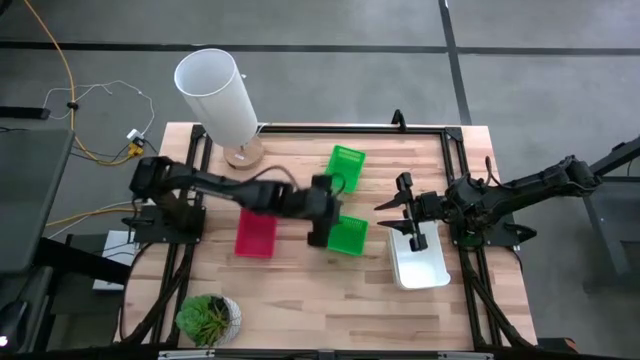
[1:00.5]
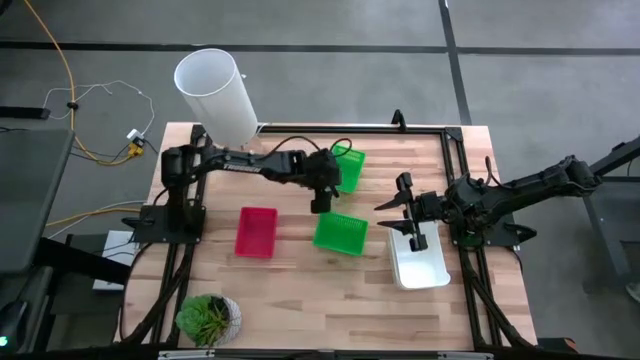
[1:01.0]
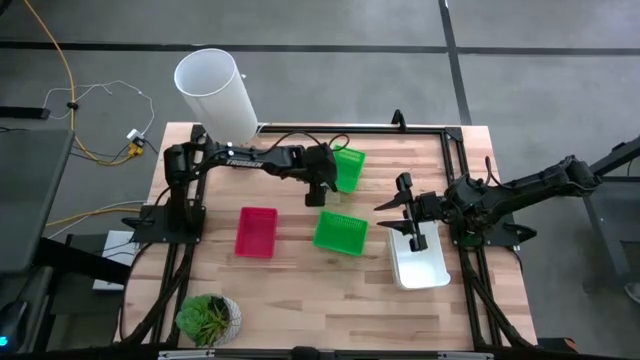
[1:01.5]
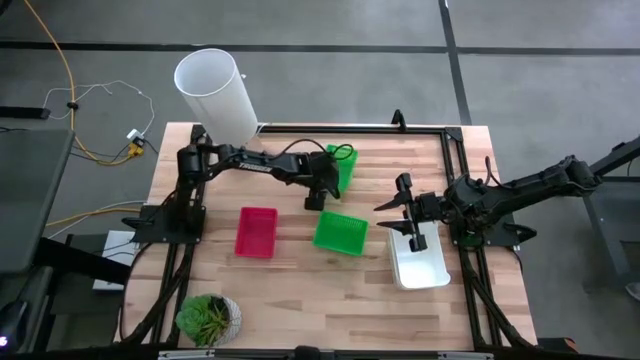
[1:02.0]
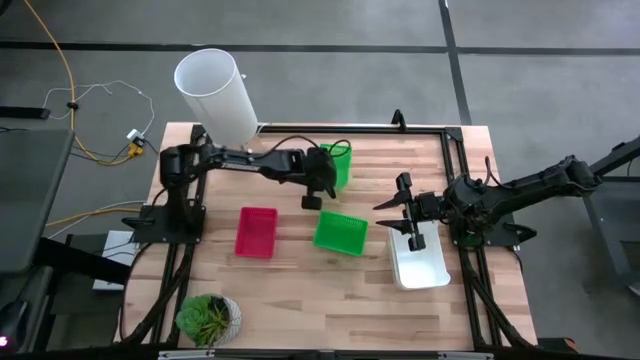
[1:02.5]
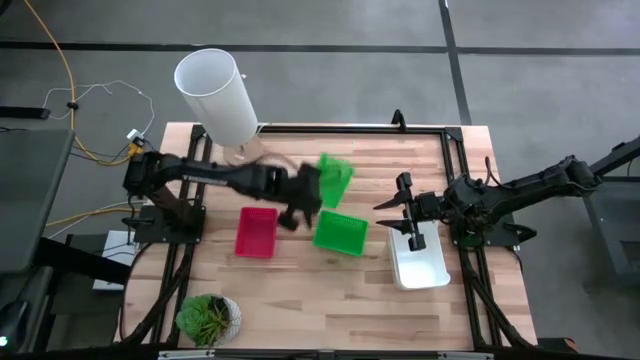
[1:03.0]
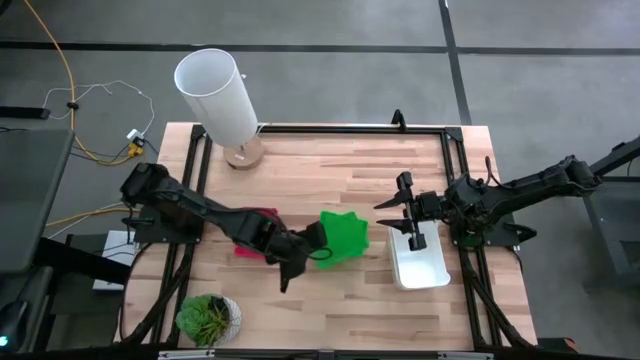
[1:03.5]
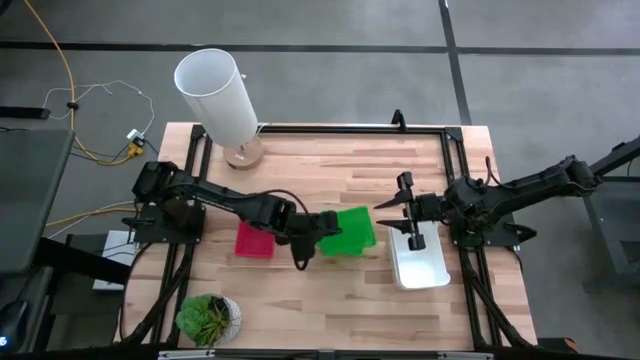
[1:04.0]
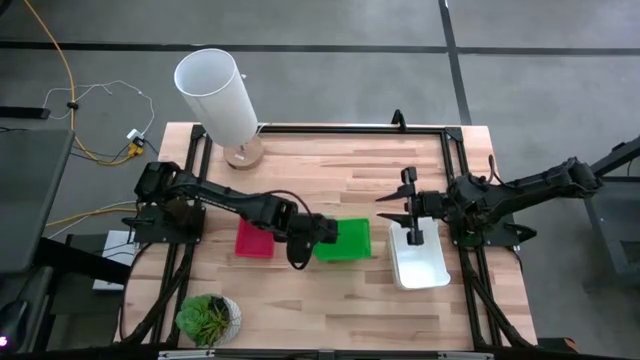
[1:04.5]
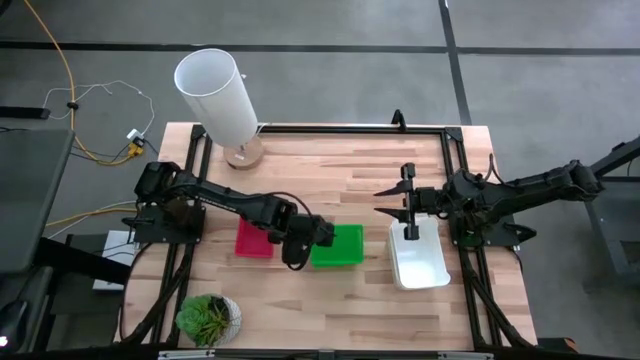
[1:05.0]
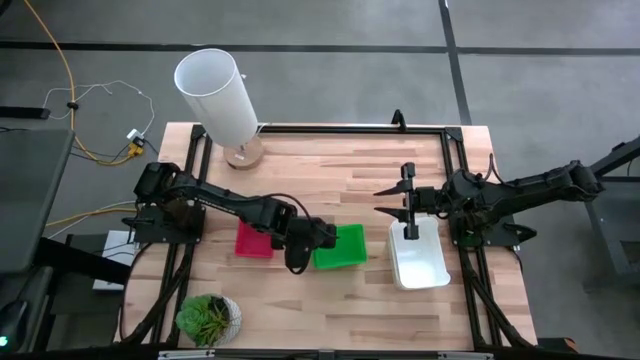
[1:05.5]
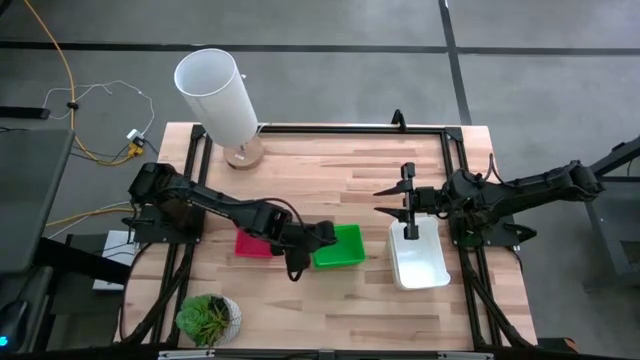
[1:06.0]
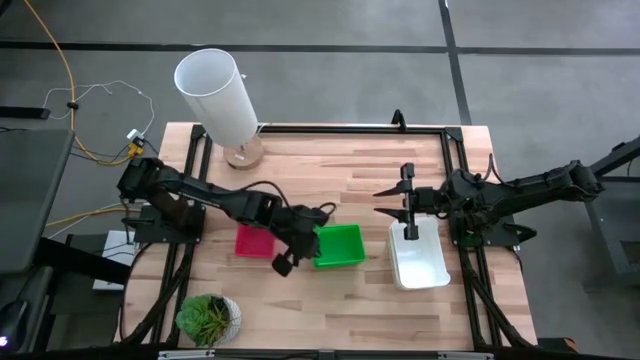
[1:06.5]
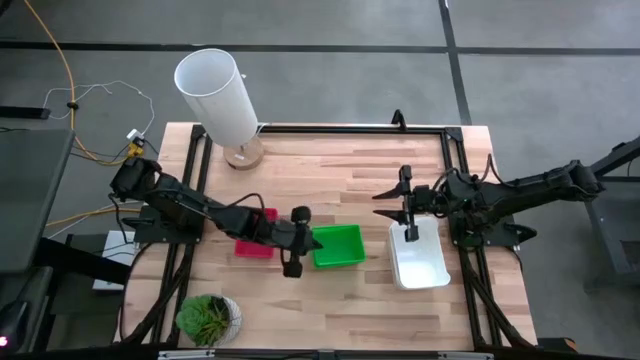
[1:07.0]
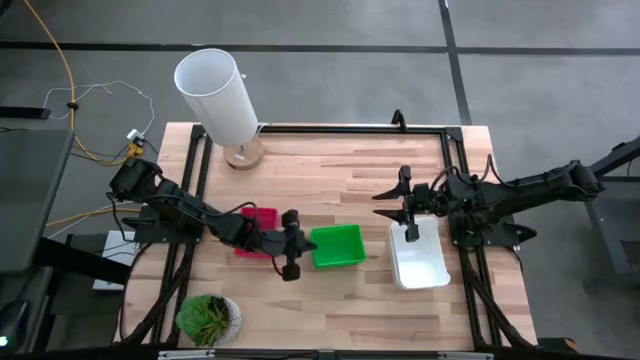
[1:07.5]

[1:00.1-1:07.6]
Stack the top green bin on top of the bottom green bin

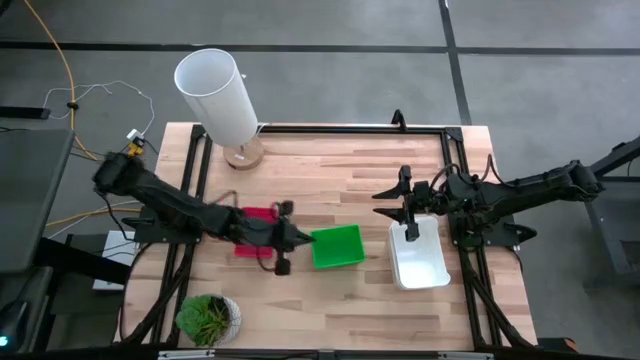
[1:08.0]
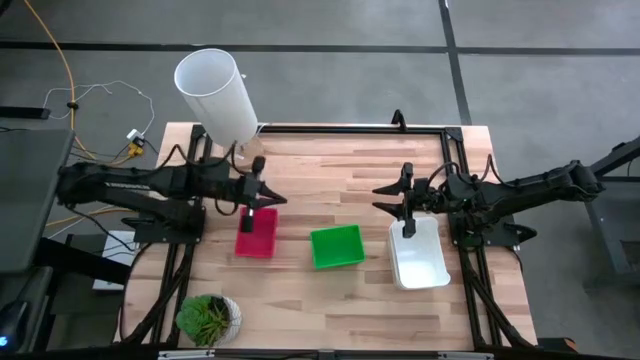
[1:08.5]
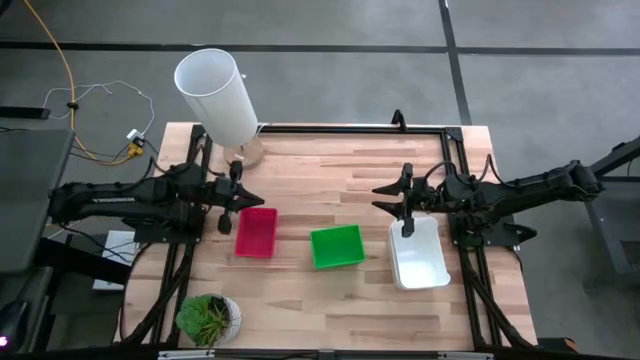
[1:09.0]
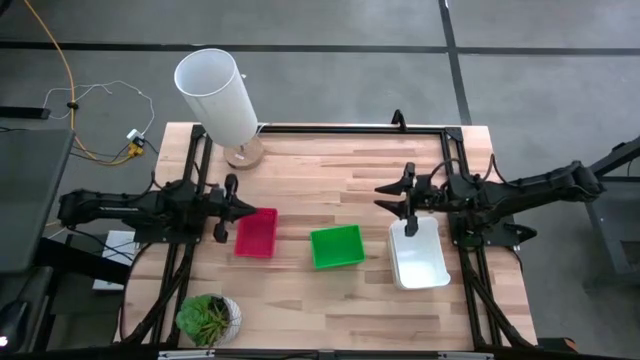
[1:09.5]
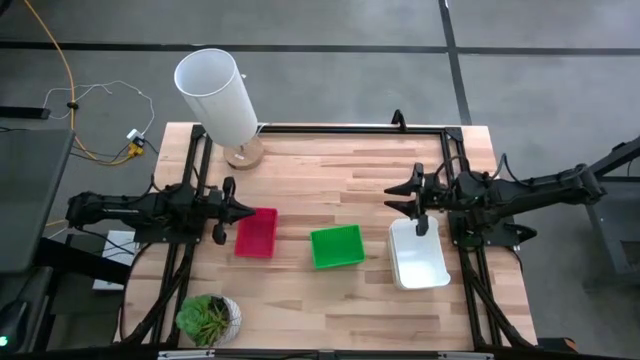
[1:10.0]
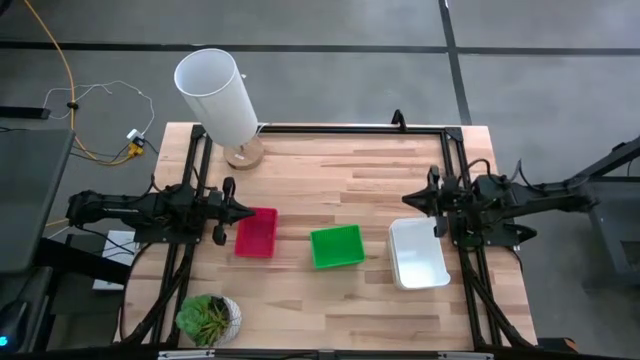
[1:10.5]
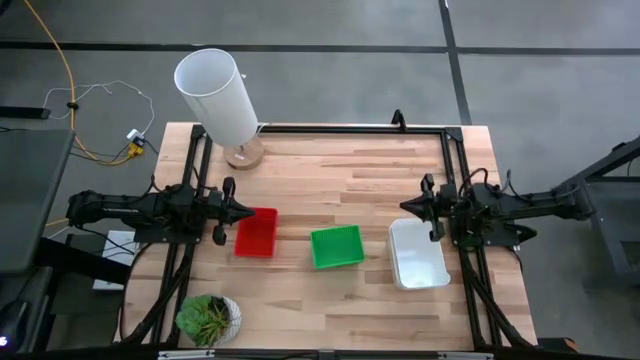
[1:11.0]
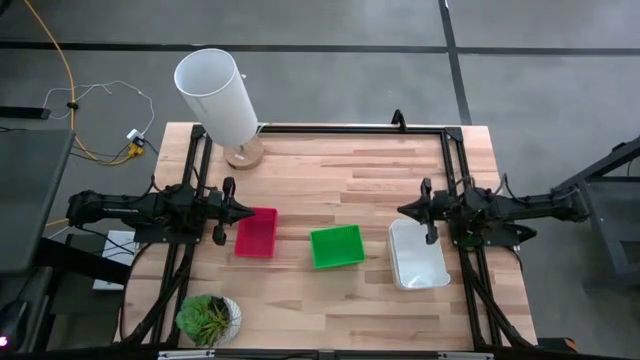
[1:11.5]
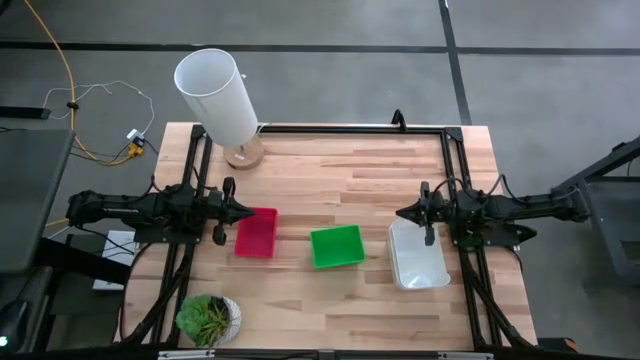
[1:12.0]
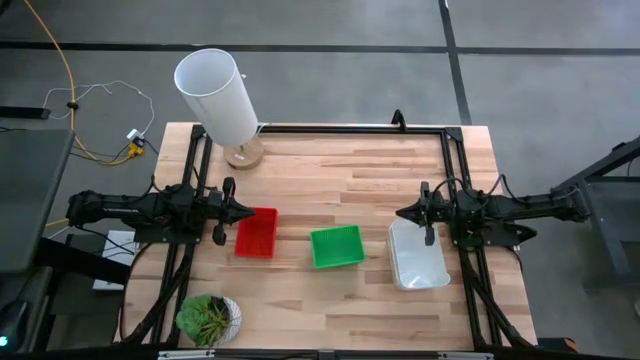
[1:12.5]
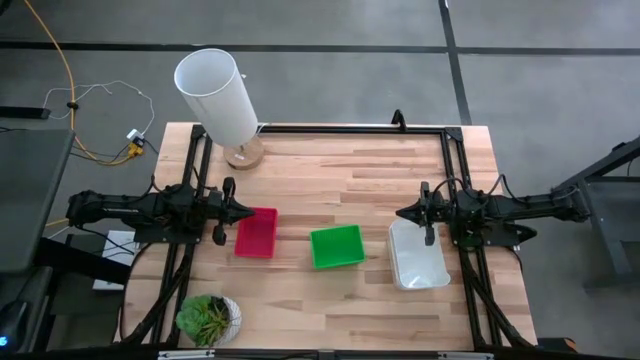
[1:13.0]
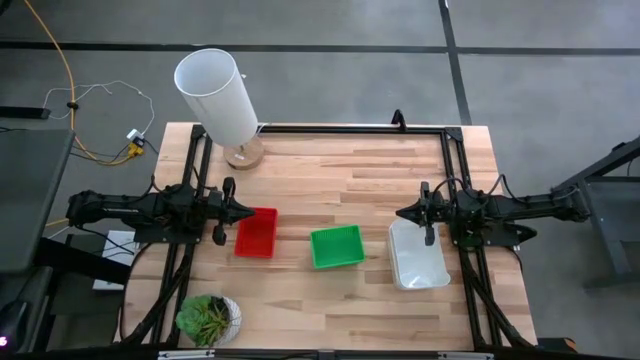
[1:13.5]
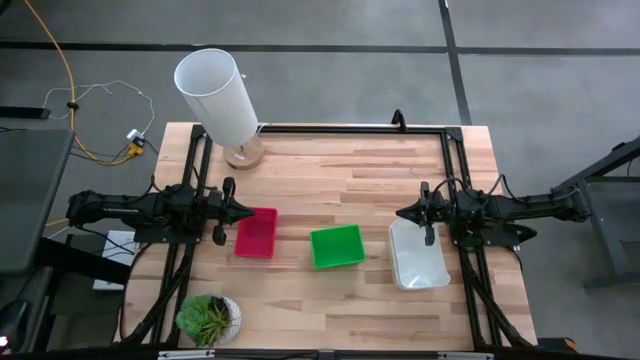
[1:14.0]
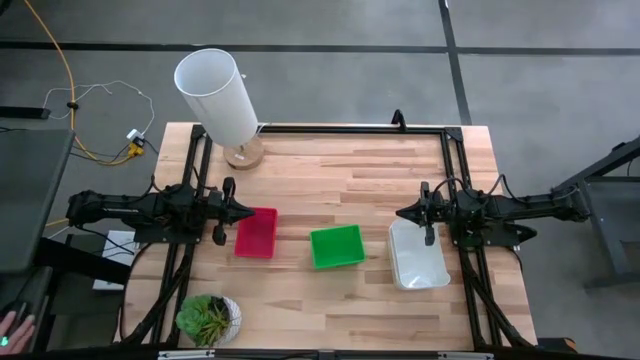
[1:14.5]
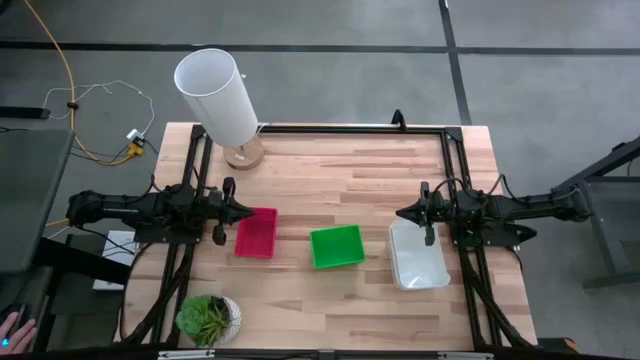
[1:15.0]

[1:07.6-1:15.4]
Return to Home Position

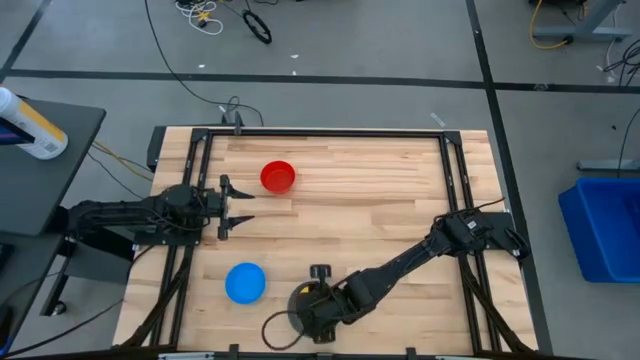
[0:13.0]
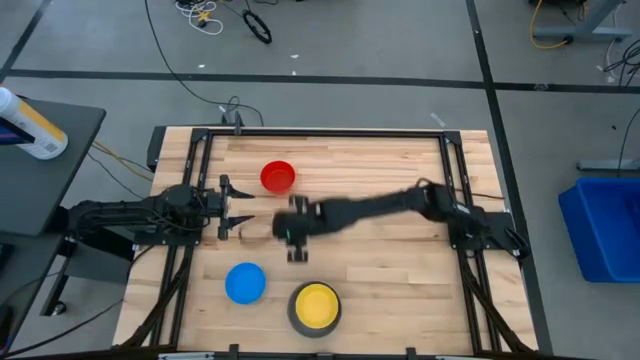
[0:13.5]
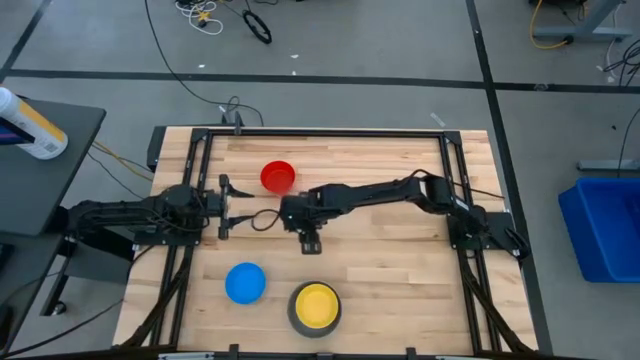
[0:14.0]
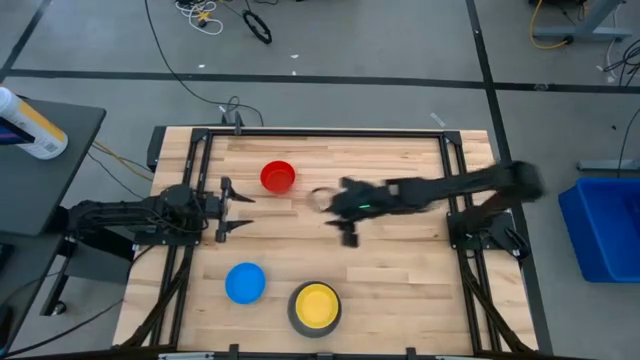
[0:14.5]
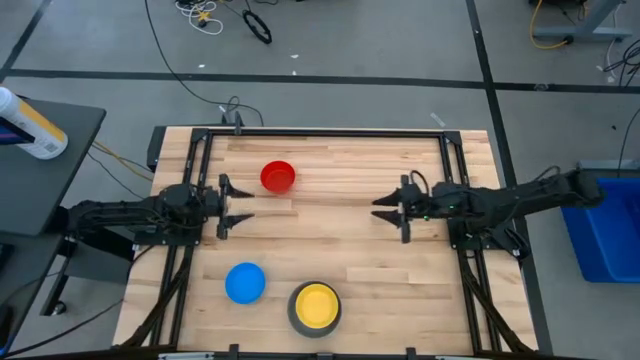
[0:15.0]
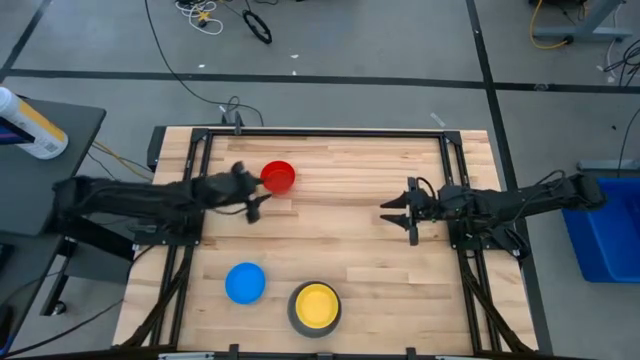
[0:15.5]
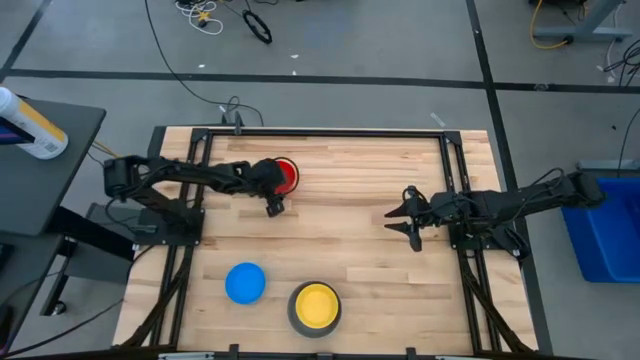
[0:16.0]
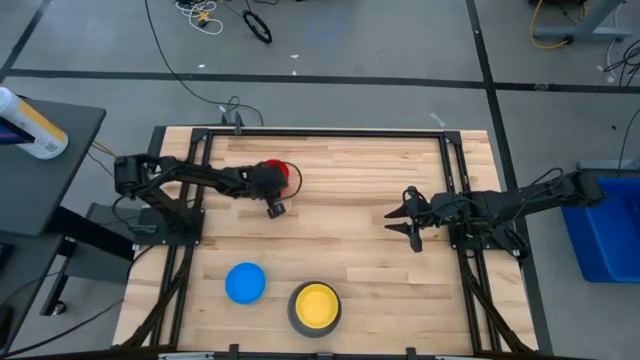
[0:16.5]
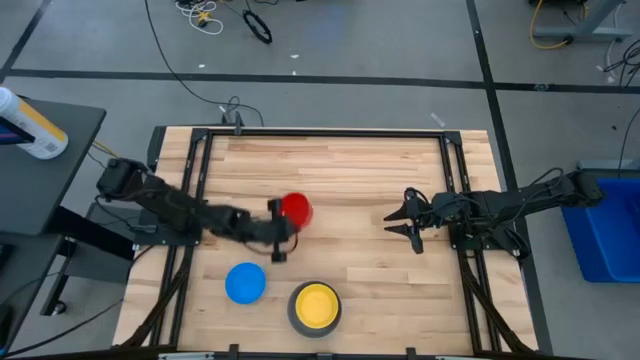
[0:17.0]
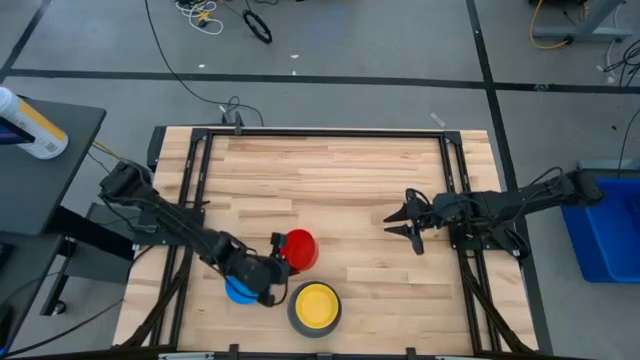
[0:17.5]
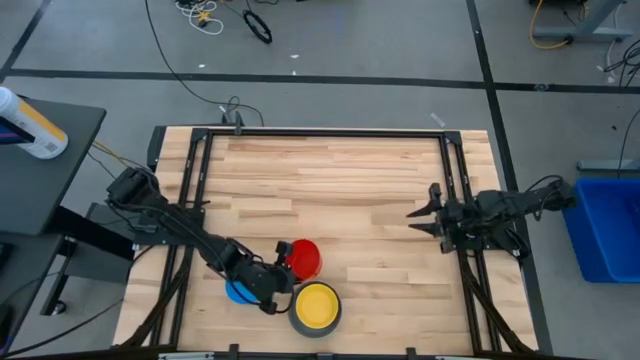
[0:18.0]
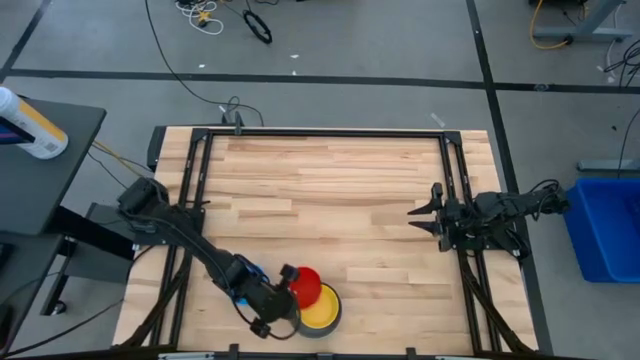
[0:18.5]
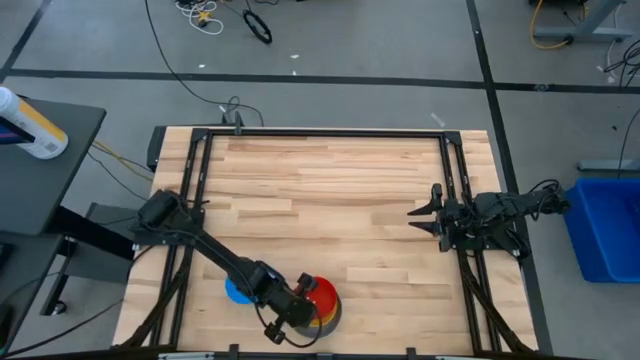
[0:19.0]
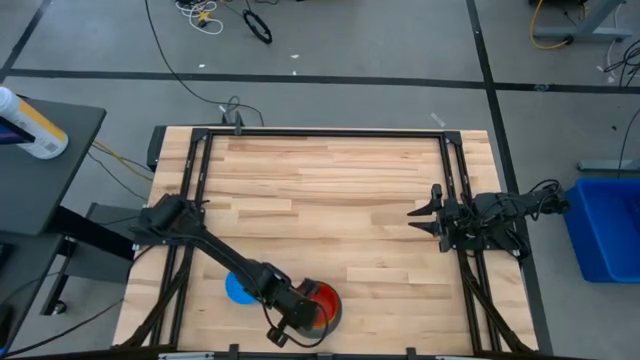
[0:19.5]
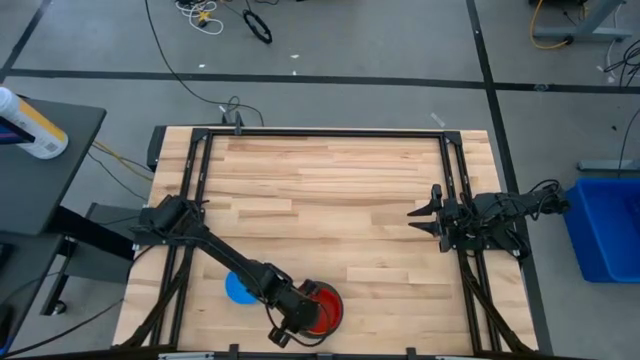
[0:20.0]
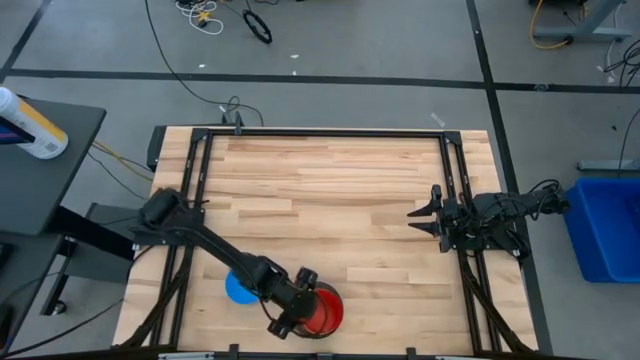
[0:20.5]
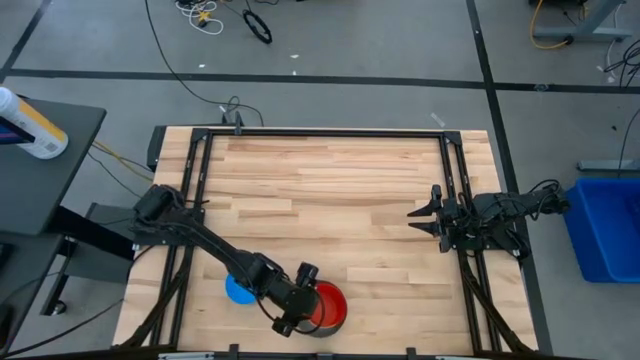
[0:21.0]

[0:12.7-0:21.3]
Stack the red bowl on on top the yellow bowl
